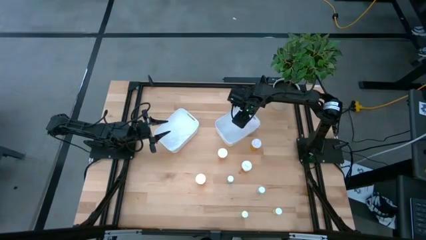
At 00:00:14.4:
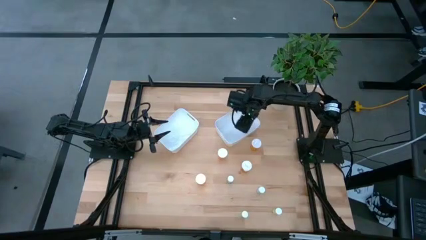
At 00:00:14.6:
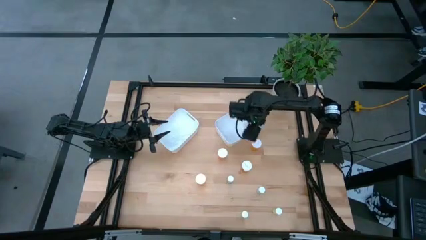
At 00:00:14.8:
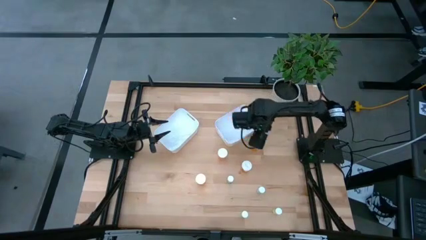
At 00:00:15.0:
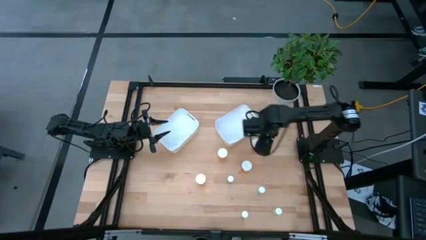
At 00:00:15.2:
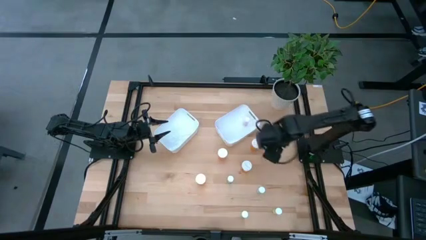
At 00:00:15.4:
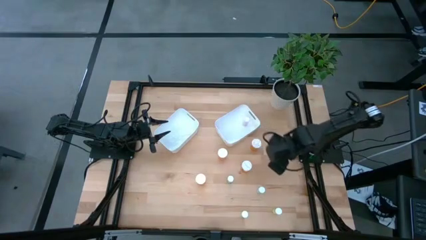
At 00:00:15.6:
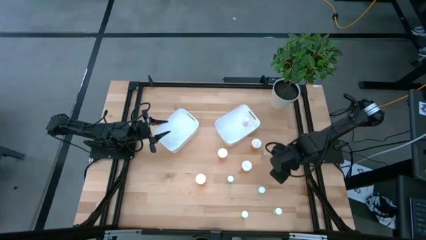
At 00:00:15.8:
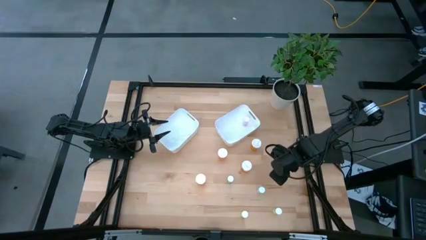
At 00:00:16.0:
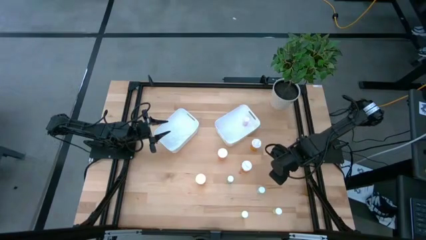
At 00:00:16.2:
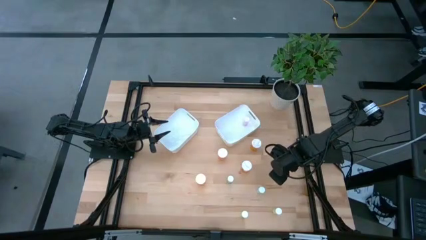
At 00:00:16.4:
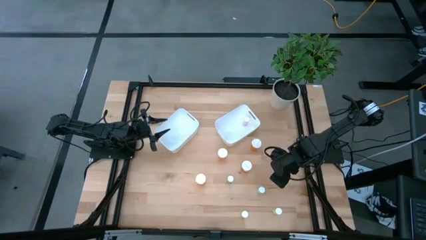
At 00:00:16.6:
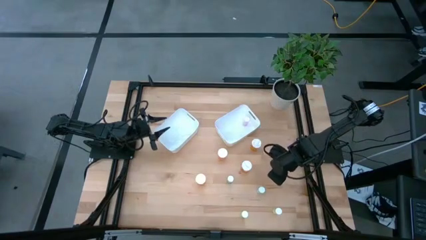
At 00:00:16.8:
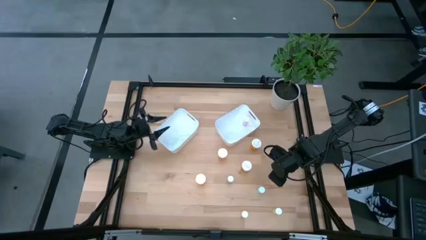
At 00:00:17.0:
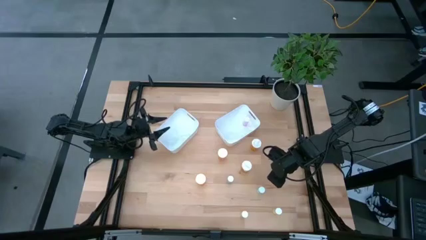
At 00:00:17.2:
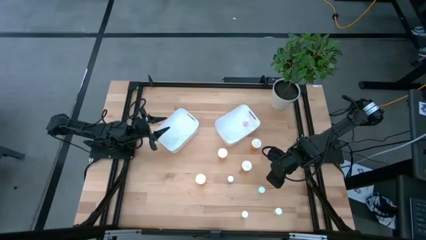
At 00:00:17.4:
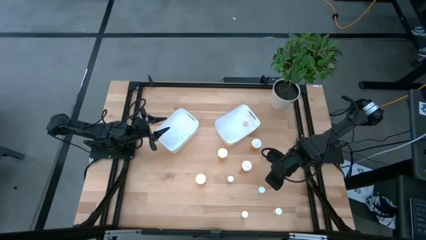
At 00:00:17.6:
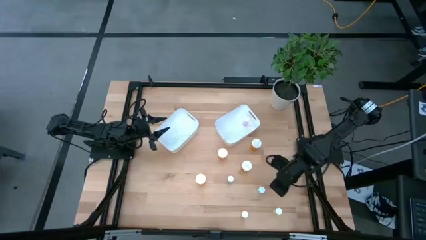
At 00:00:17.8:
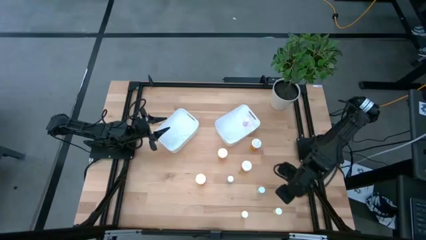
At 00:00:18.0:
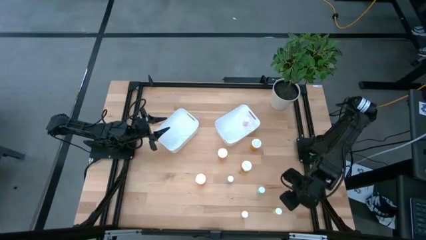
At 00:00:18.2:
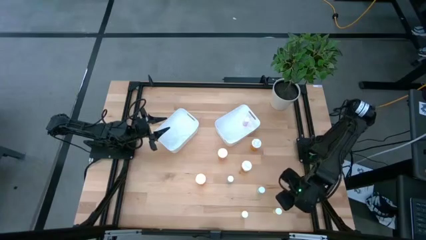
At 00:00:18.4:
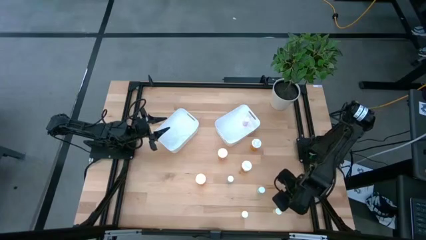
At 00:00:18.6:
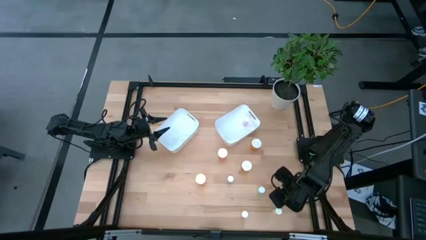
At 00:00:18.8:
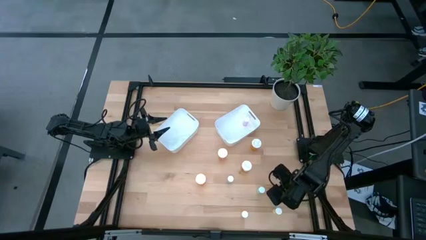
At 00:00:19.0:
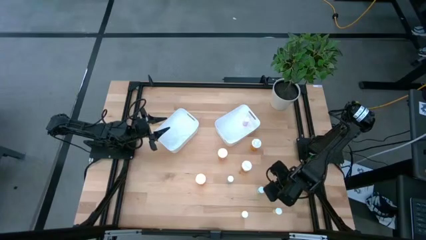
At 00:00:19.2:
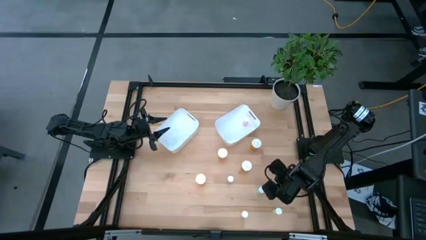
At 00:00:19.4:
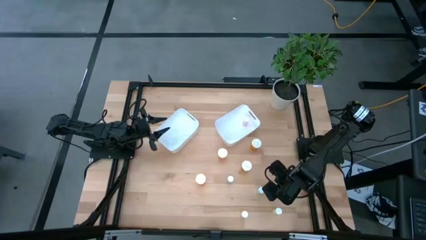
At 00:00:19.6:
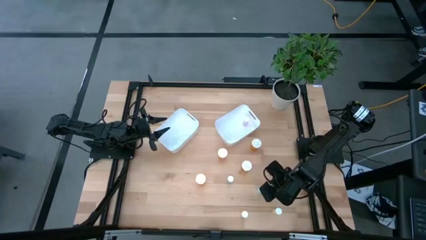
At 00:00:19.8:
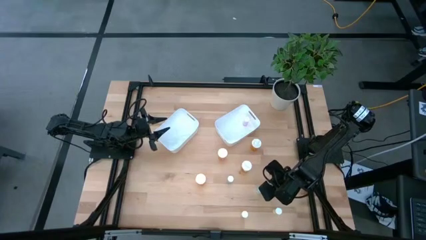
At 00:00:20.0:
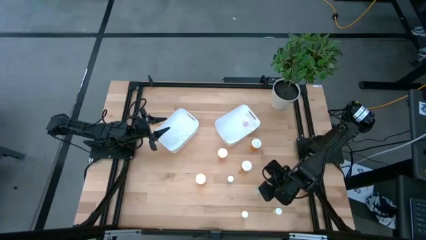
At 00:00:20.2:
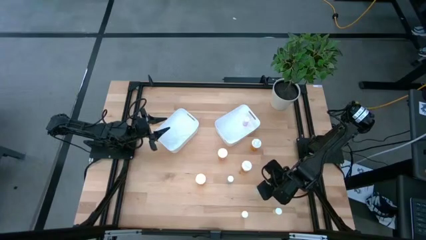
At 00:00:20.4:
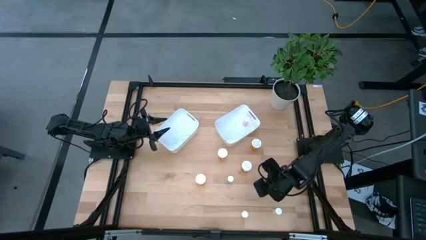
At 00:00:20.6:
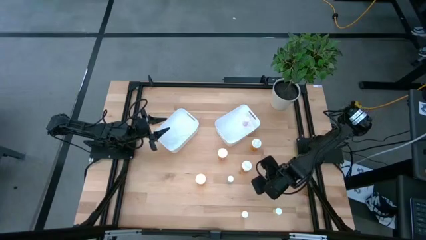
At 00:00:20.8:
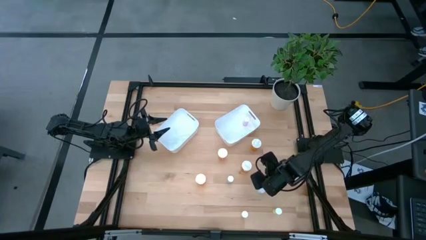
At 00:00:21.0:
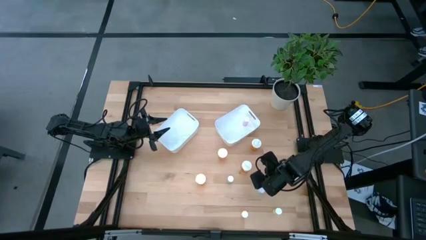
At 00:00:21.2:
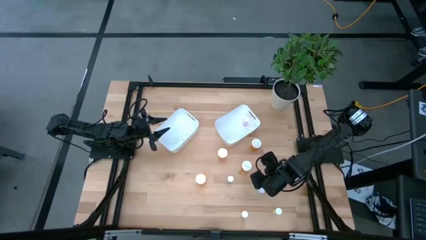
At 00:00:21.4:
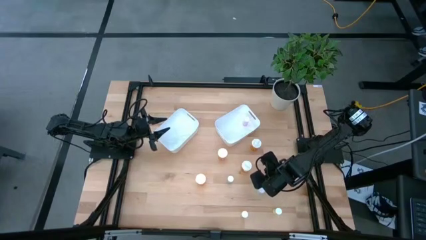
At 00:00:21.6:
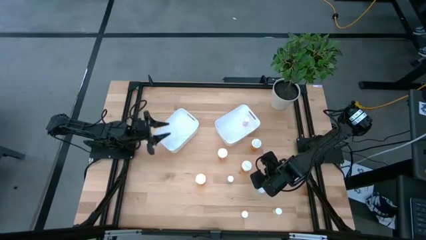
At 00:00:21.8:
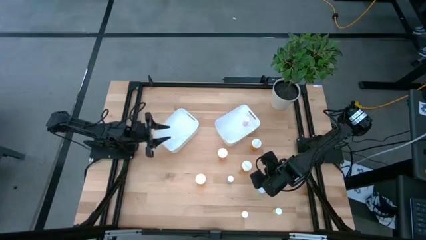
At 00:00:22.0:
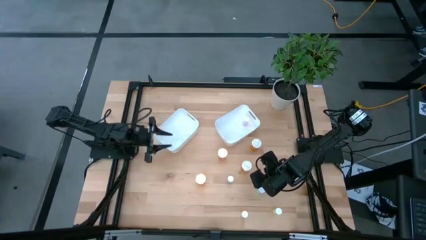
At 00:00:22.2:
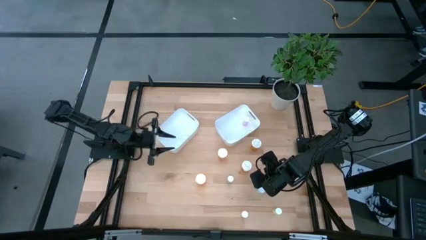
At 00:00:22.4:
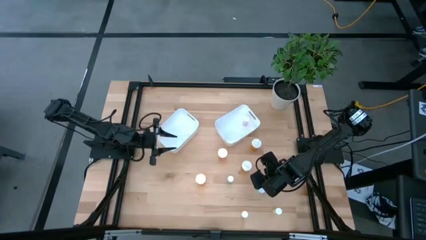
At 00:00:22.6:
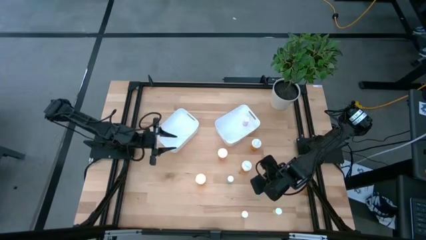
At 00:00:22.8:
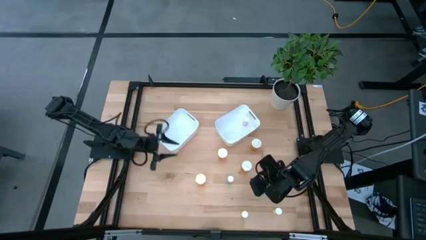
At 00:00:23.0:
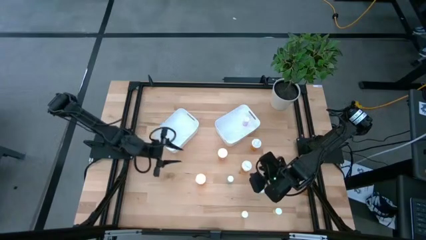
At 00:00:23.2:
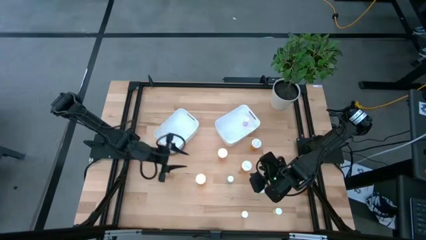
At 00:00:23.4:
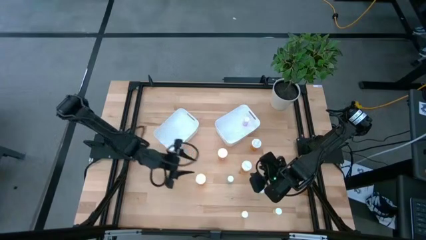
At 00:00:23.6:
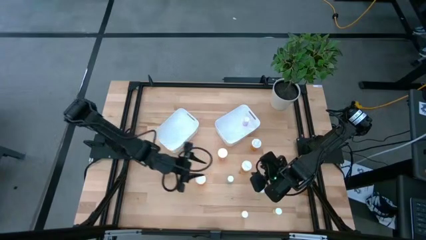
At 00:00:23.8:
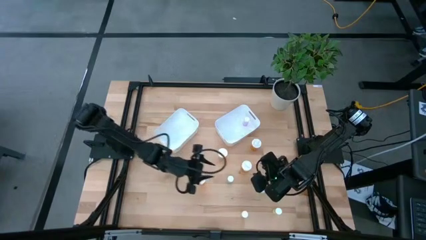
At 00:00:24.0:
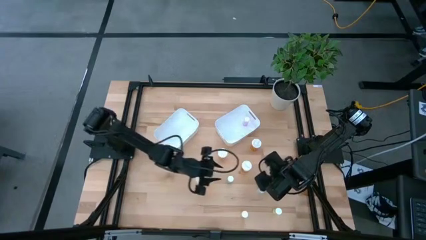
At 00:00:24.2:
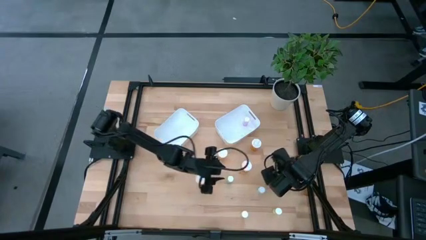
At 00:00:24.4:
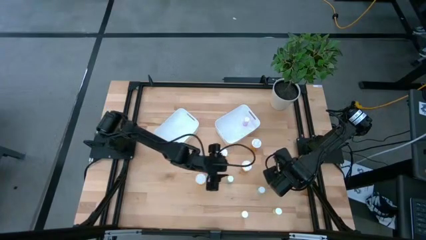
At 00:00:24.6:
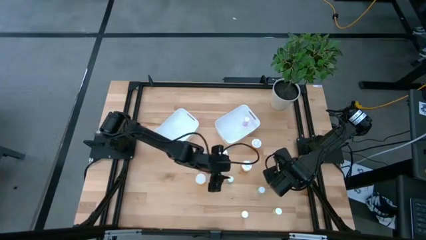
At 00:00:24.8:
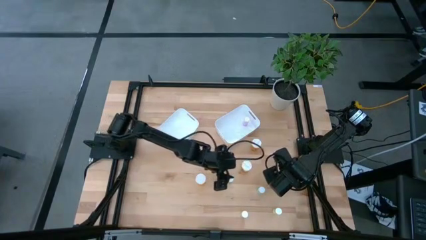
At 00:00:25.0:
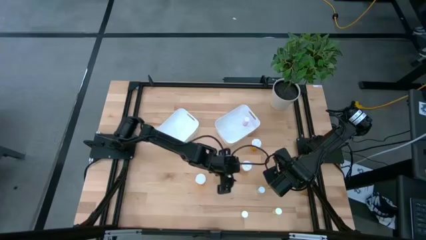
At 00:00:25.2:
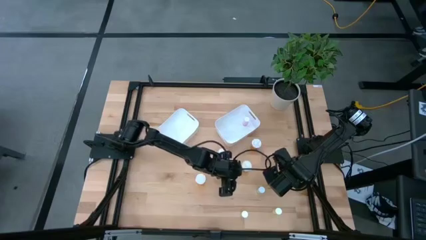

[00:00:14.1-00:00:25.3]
Task: Pick and place medicine bottles into bin by pill shape (circle, oval)
Put the orange capsule bottle into the left white bin
